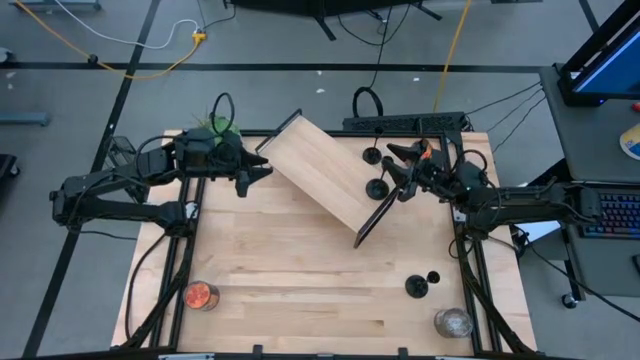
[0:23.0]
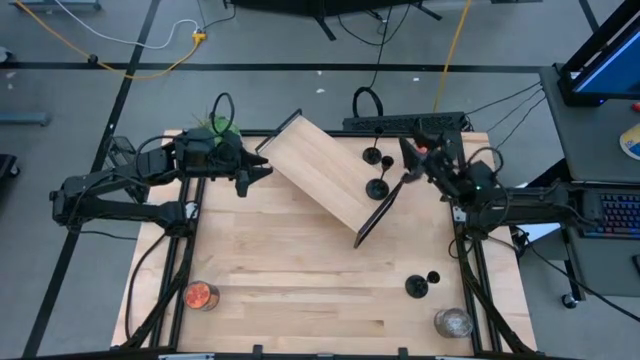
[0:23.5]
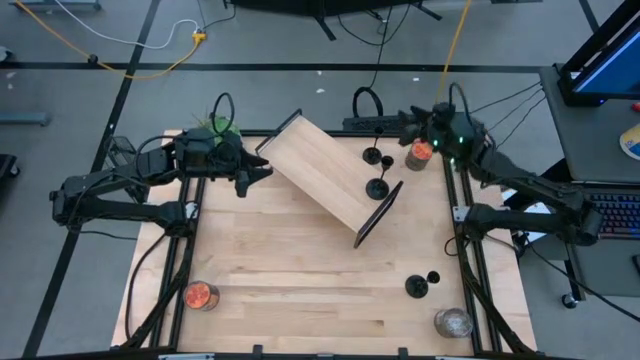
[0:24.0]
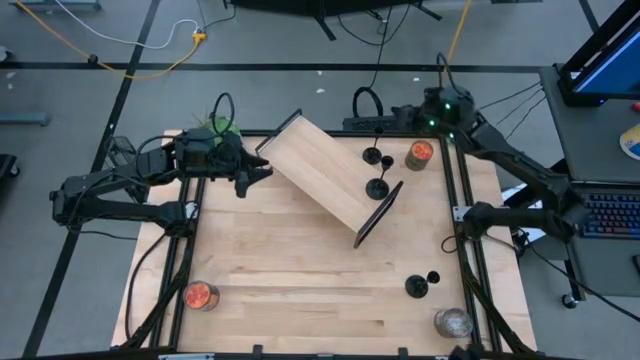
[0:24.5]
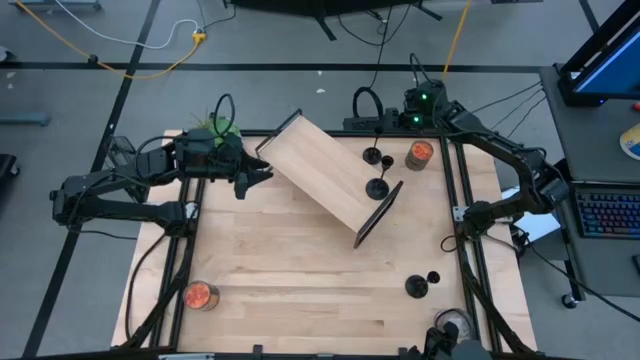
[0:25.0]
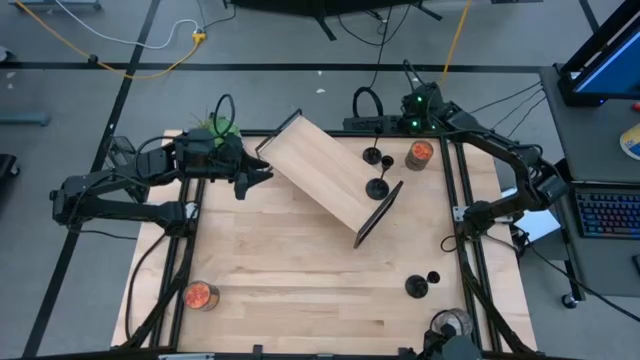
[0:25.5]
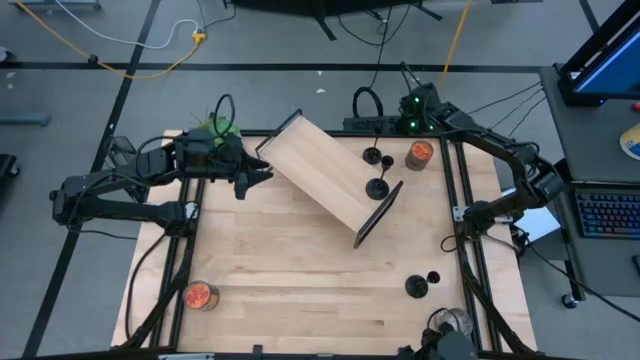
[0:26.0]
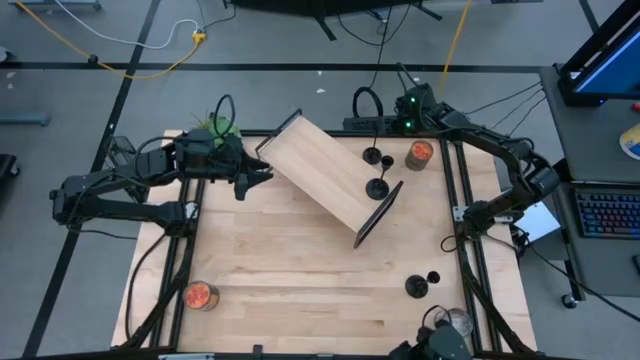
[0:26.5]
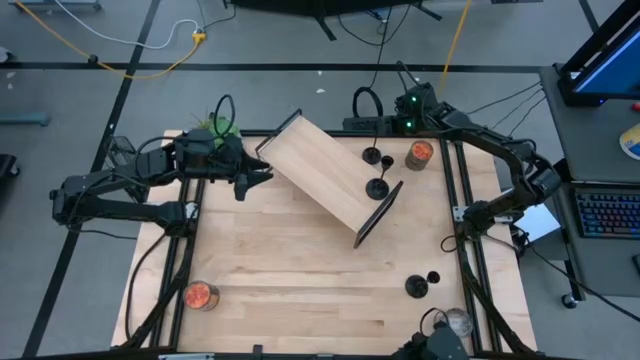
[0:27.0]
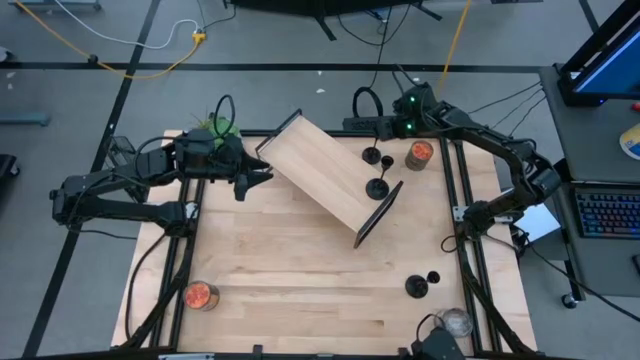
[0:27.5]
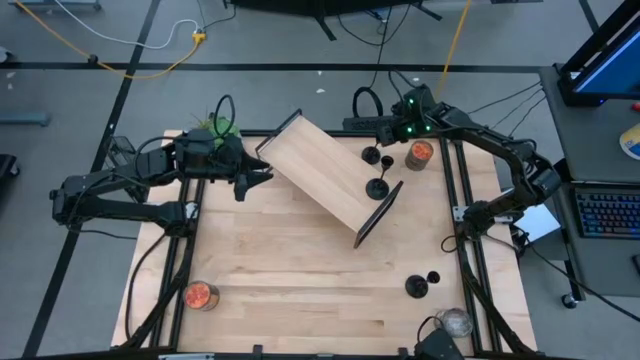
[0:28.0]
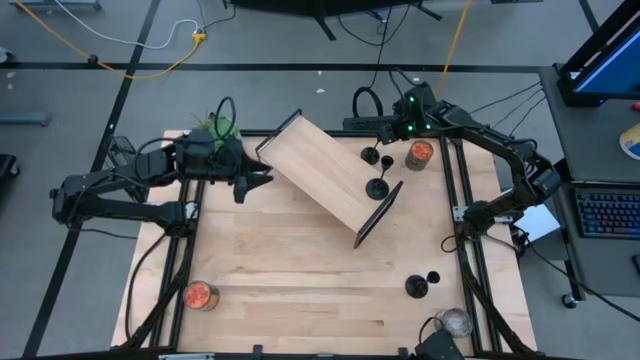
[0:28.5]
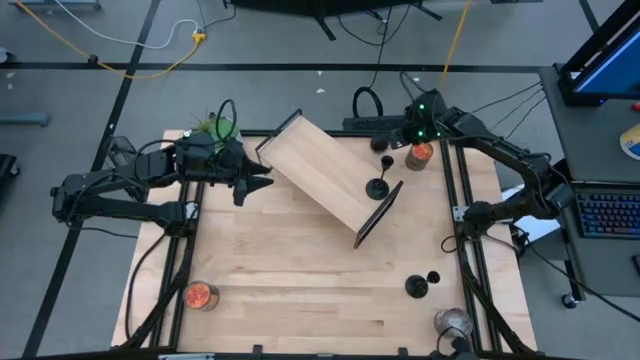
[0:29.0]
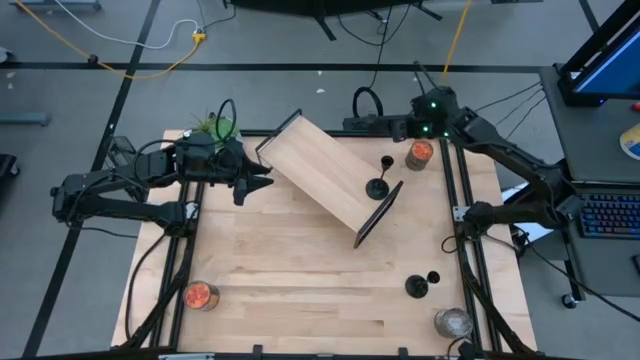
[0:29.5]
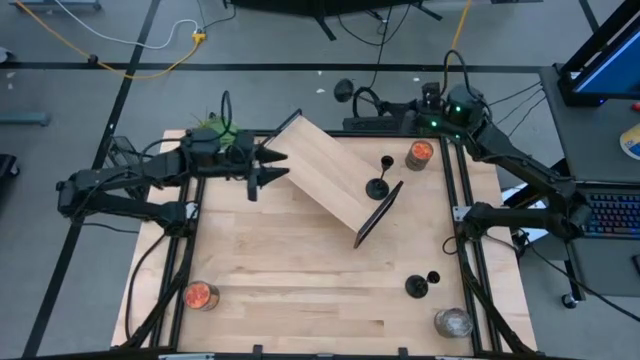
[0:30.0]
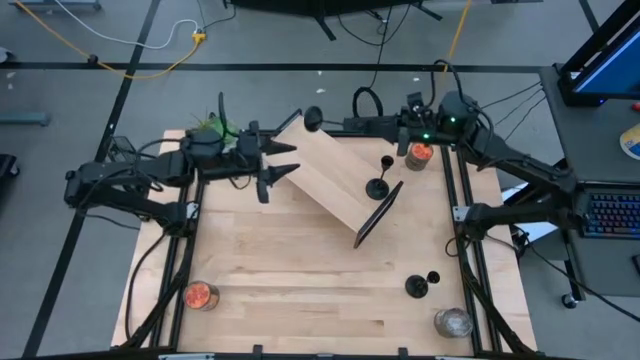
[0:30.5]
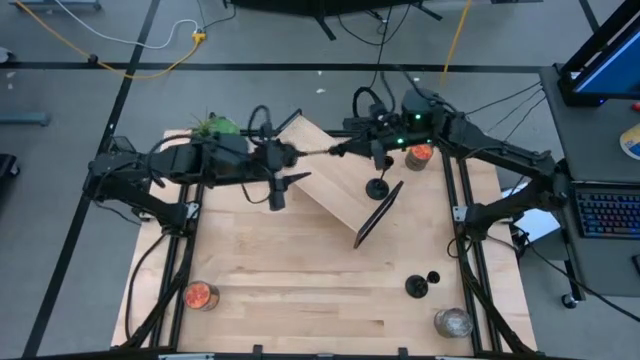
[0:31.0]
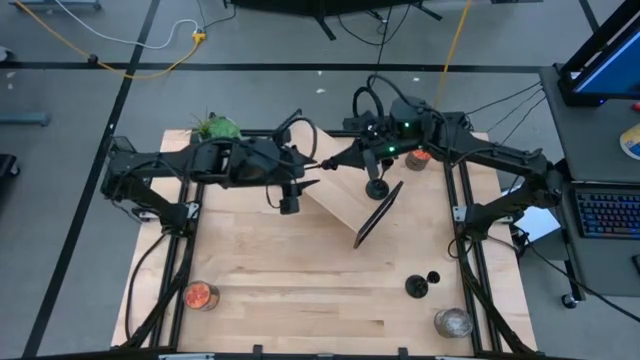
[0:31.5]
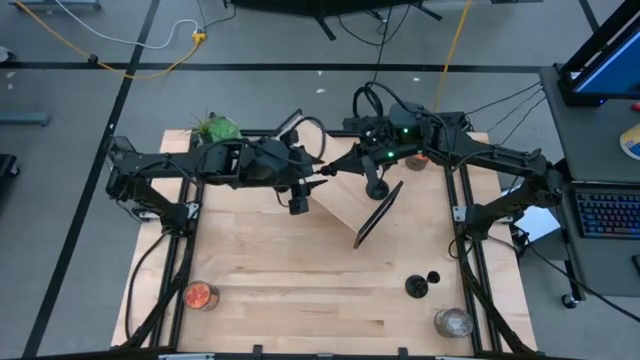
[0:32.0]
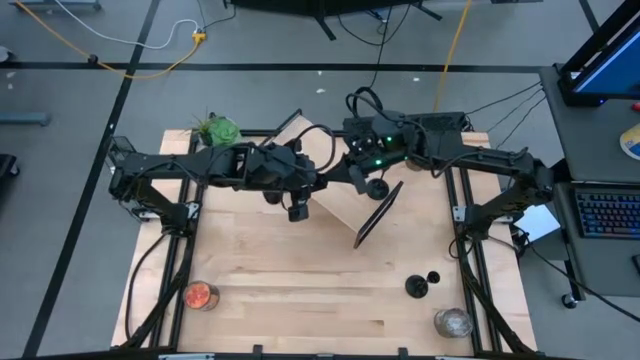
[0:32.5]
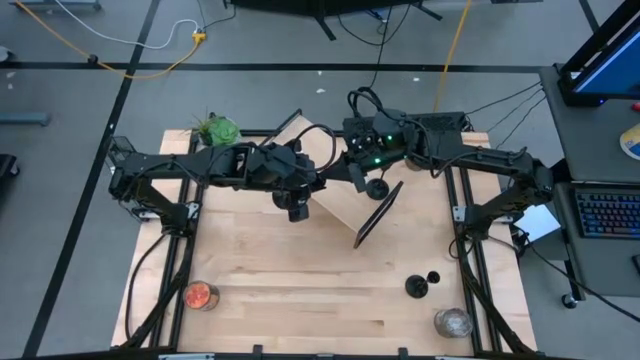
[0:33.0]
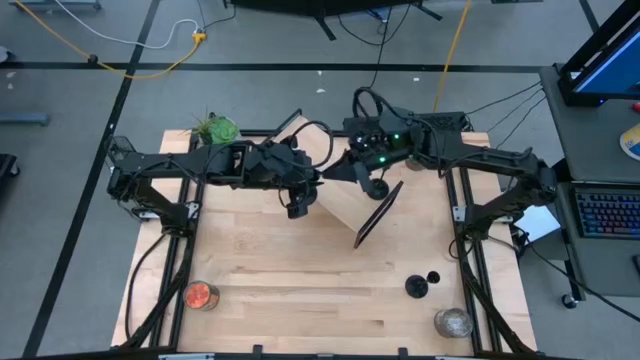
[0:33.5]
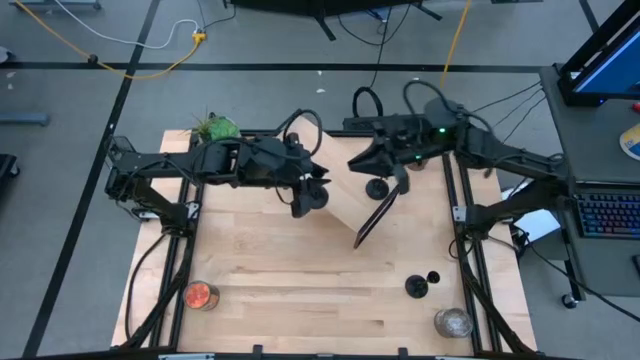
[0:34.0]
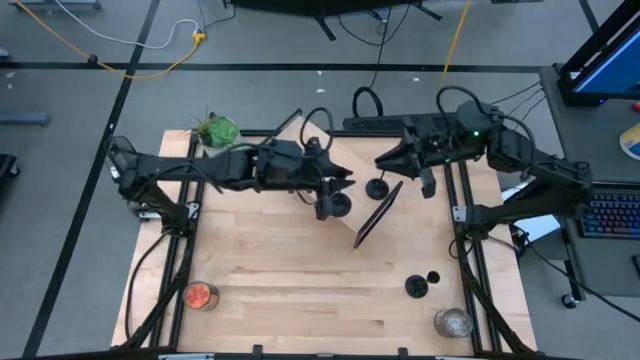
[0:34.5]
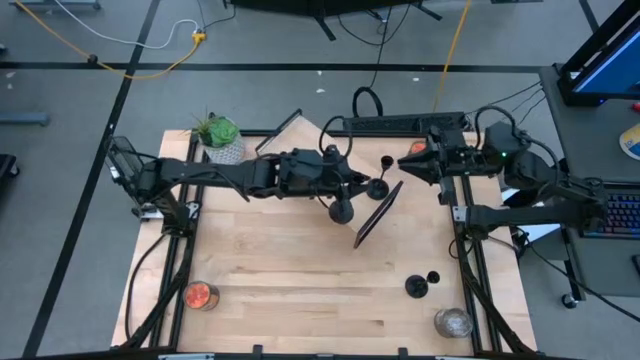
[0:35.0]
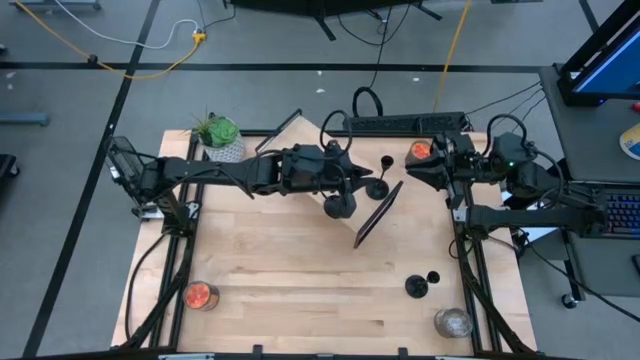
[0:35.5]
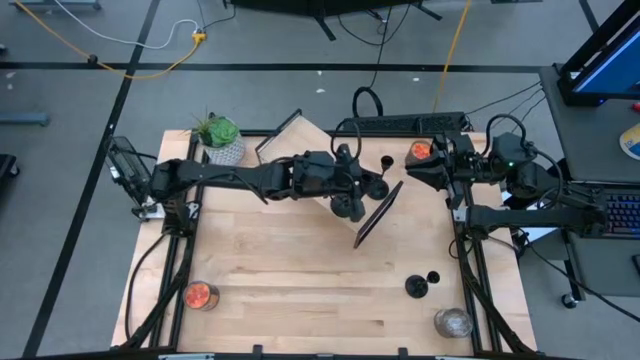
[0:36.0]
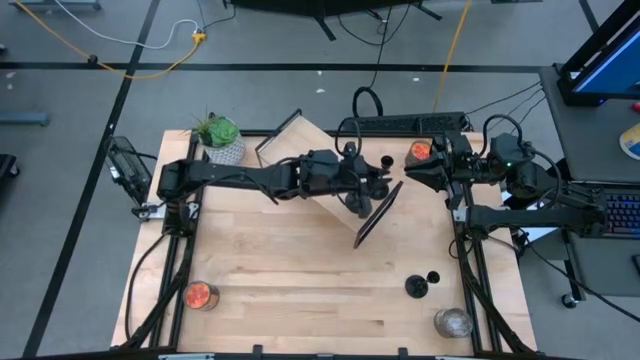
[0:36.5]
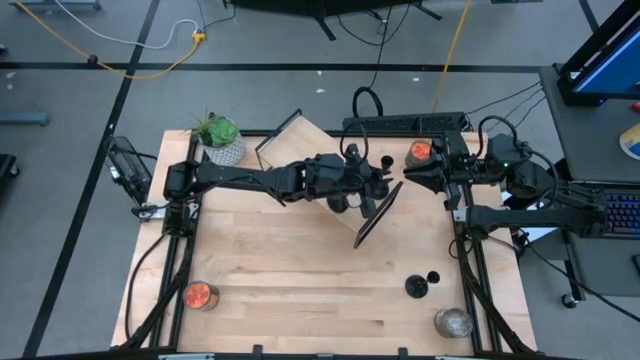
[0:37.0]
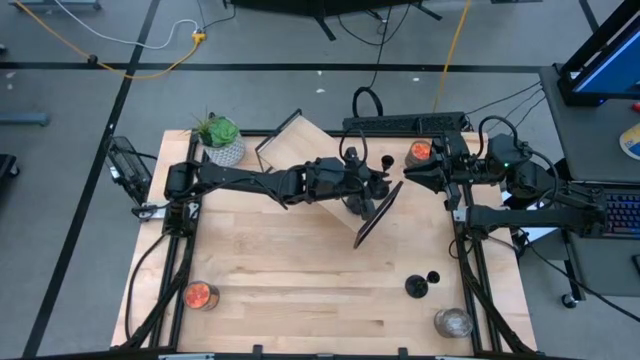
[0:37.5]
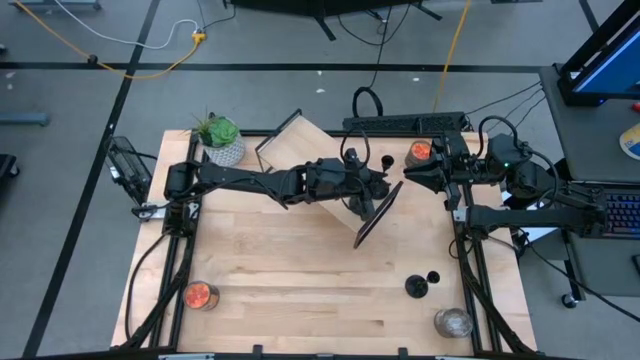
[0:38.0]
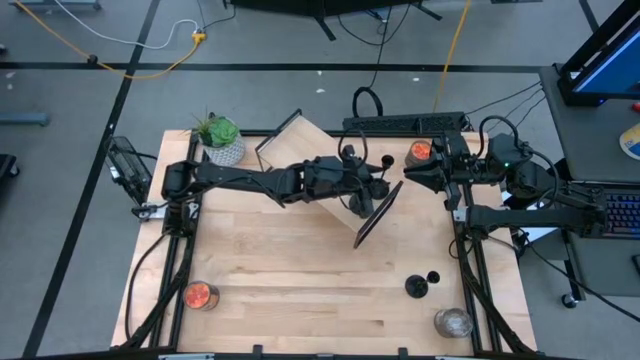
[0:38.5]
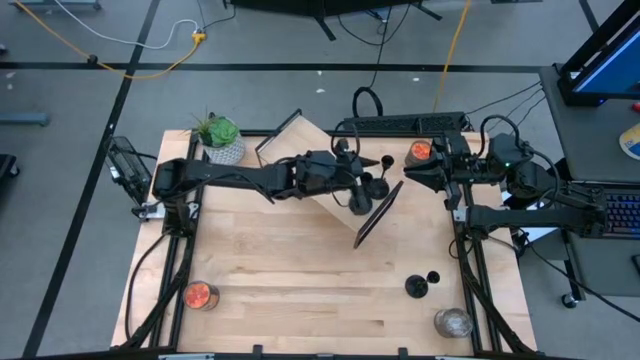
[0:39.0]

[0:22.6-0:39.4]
Task: Pick & Place candle stick holders
Put the top black candle holder on the shelf

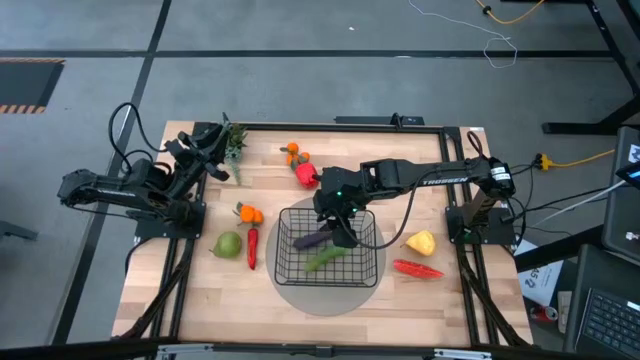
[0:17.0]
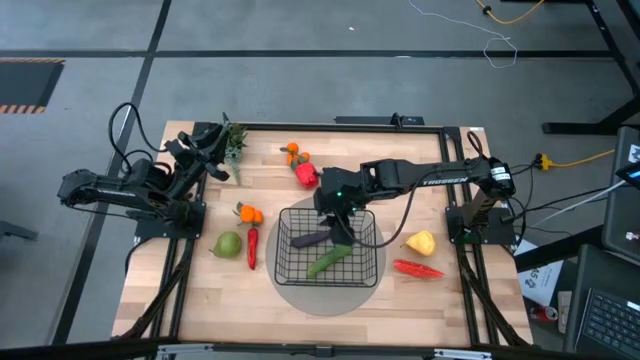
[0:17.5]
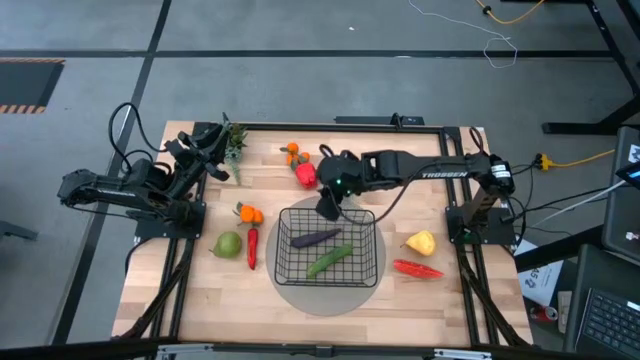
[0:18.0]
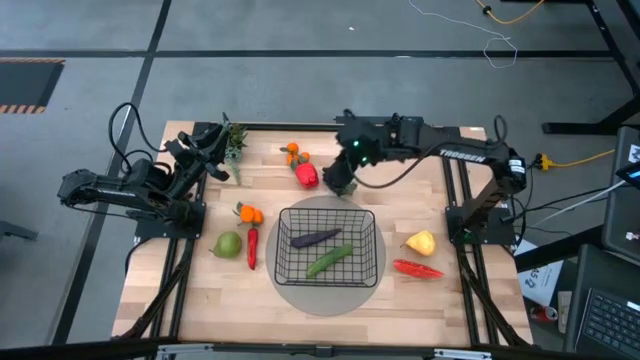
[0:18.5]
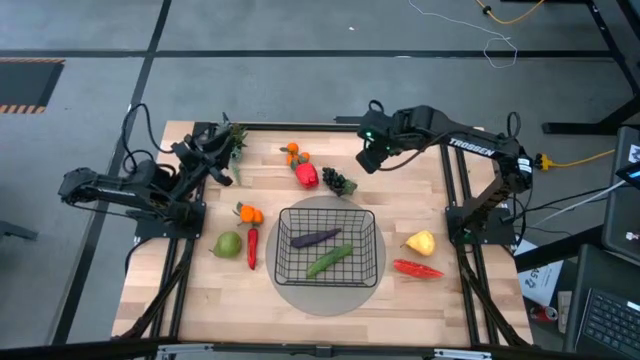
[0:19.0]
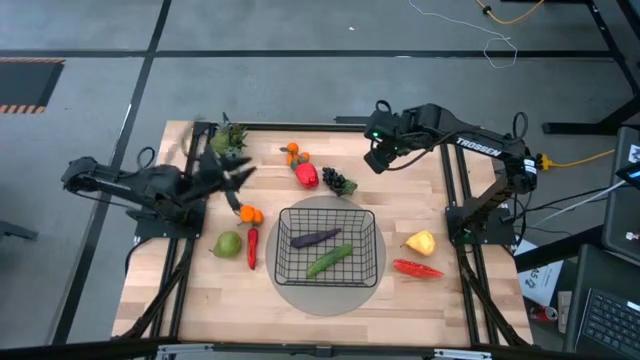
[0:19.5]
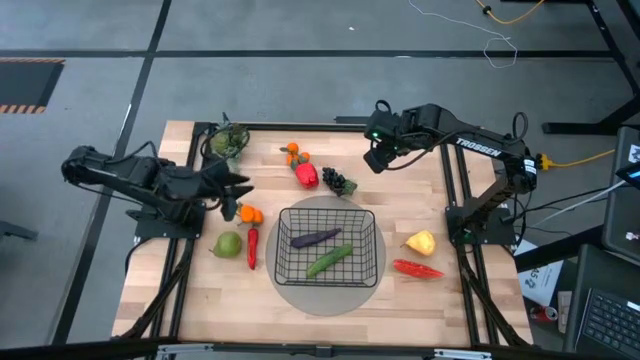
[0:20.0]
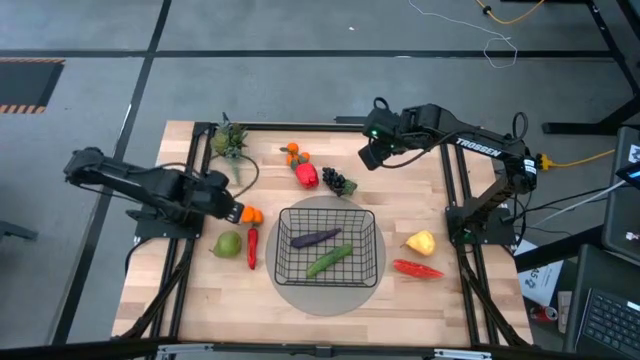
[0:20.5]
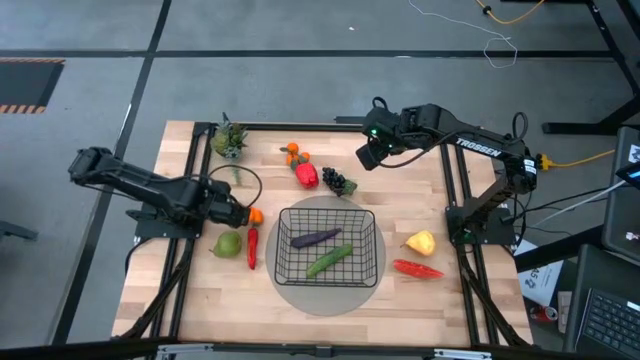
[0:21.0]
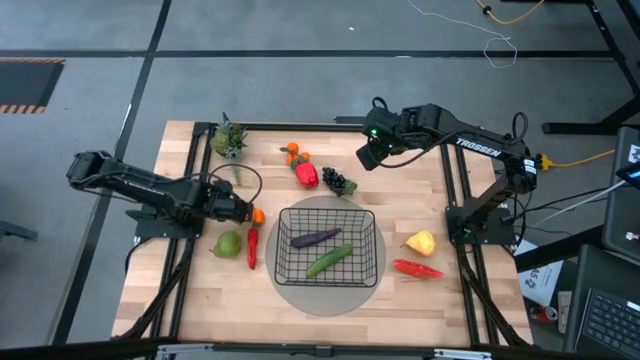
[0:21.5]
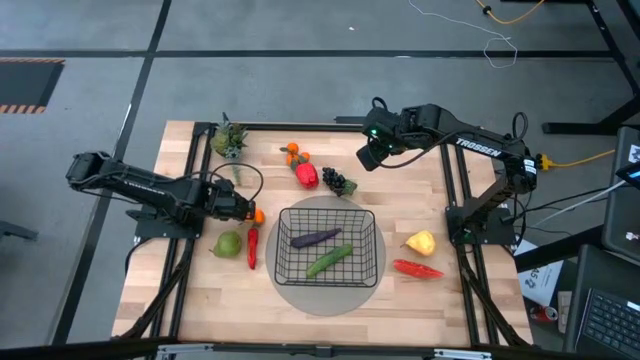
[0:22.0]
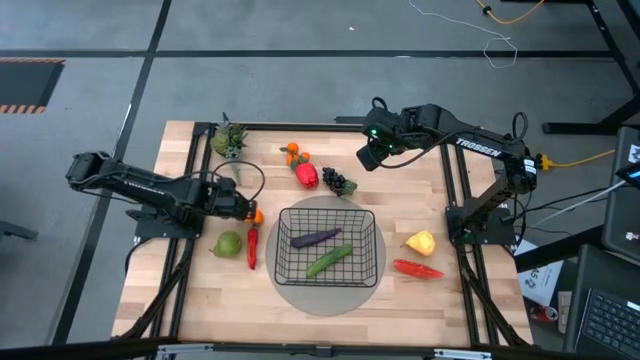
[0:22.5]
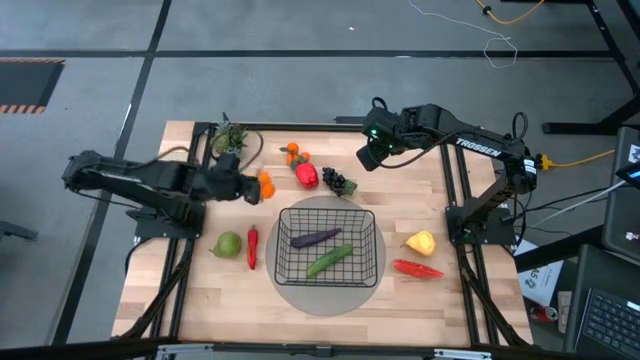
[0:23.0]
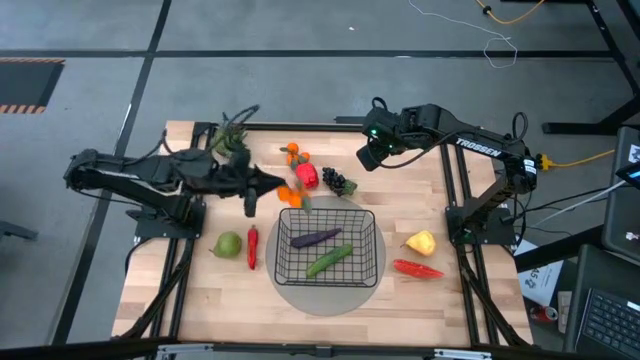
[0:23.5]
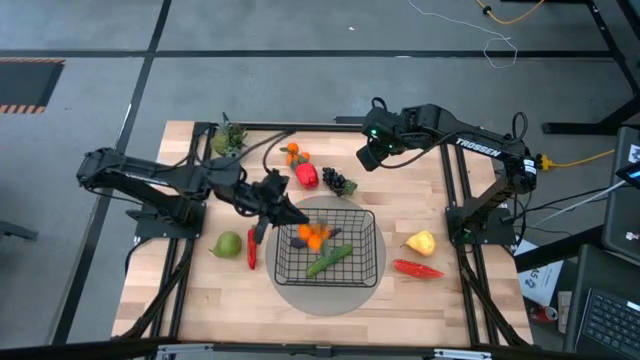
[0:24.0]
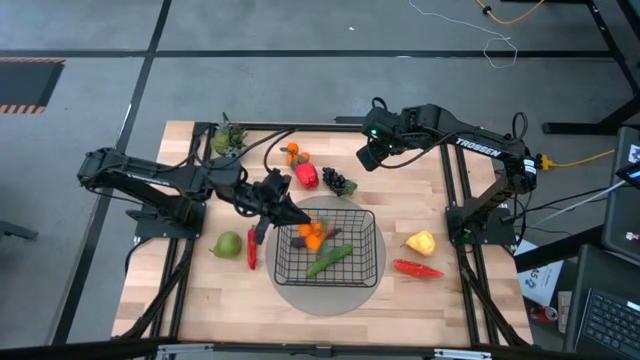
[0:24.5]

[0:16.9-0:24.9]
Task: Build produce basket
Put the bottom orange tangerines into the black wire basket
